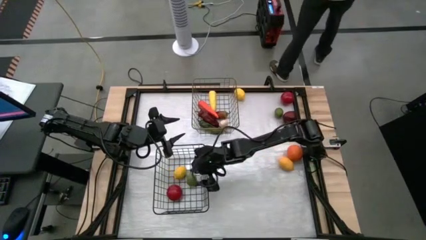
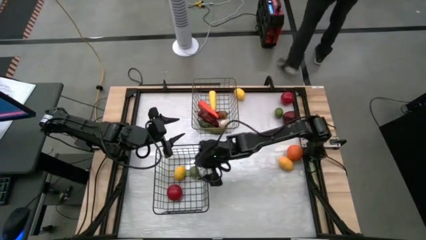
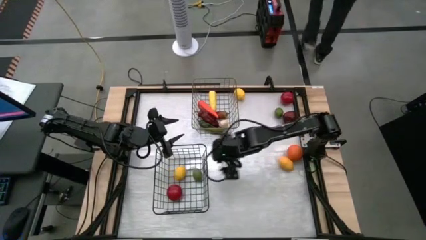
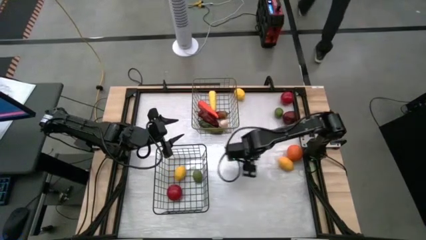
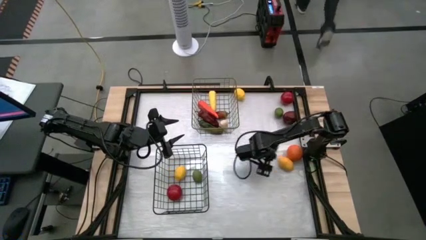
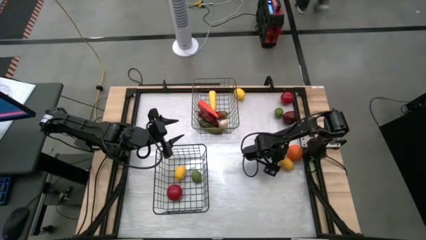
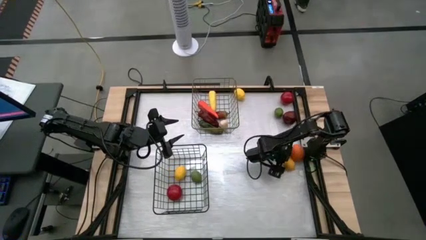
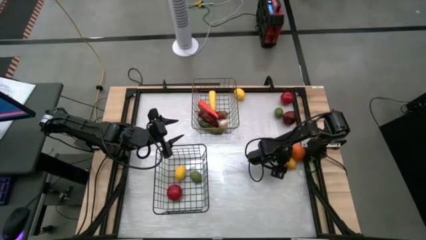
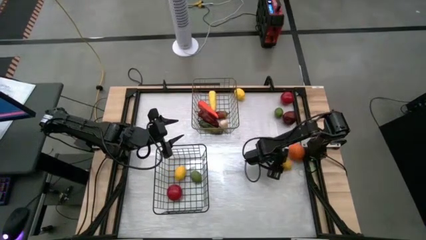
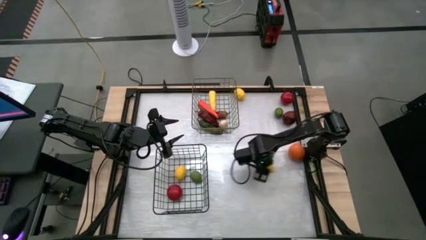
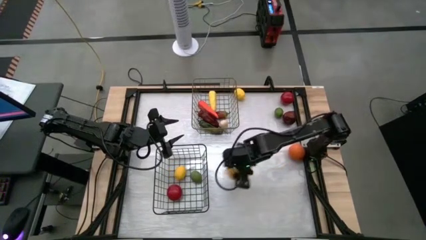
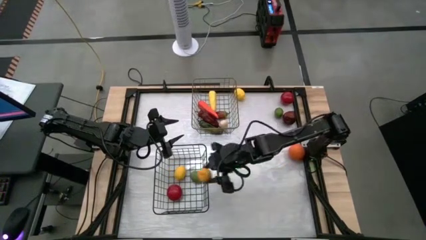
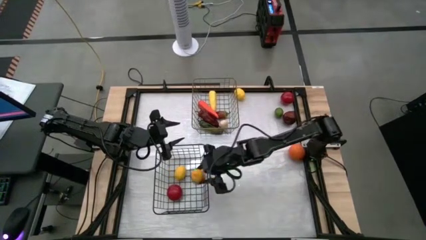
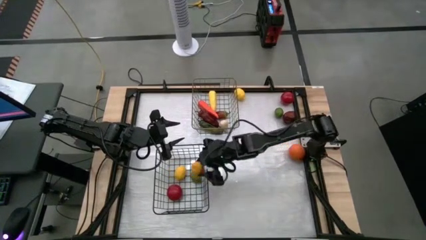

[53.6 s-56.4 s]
Task: Sort produce into baskets
Put the bottom lemon into the black wire basket

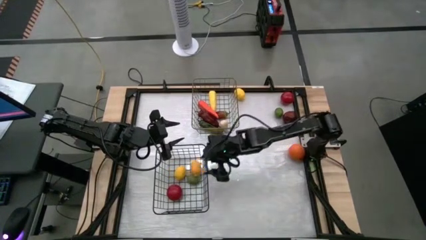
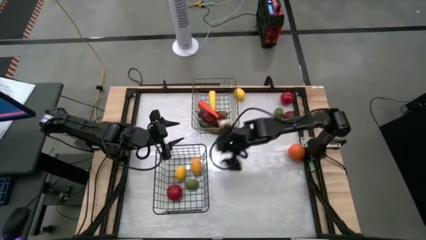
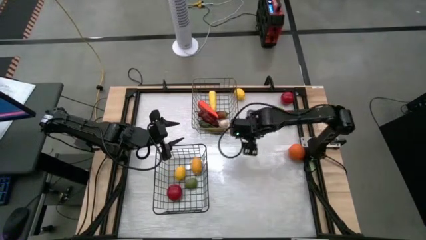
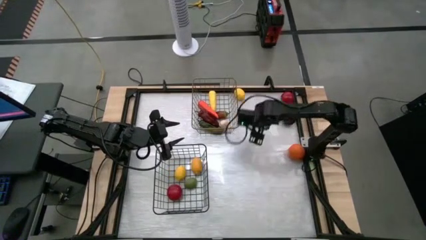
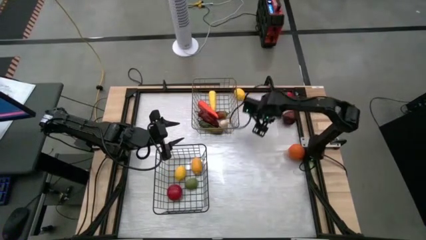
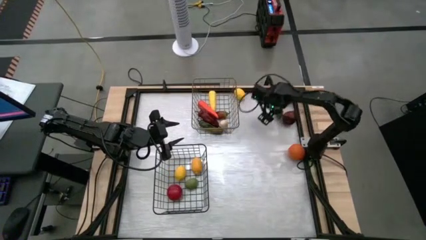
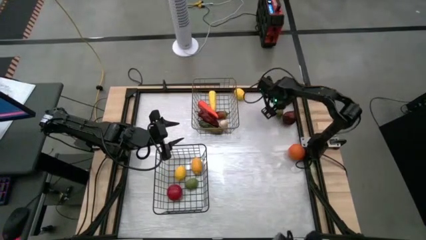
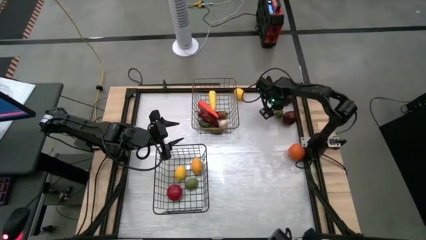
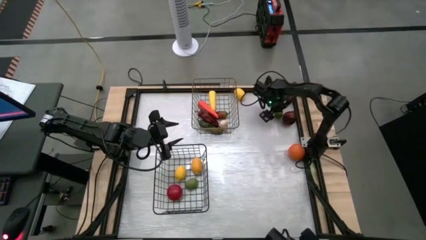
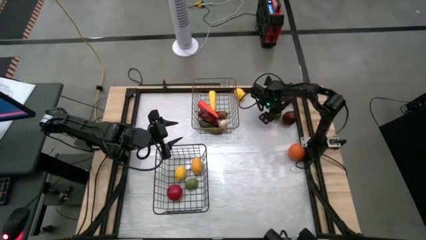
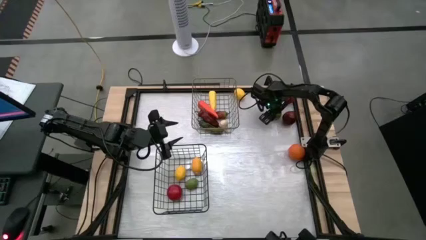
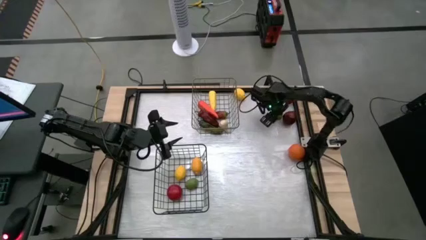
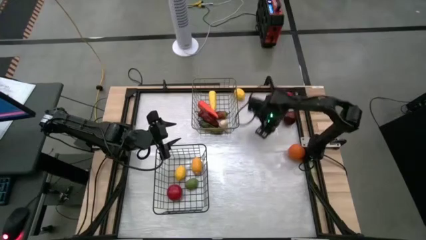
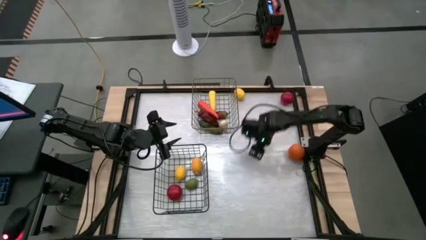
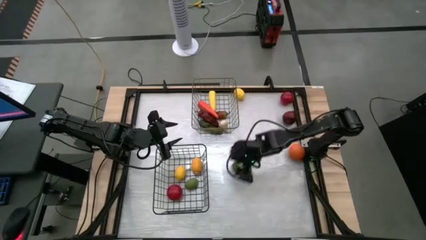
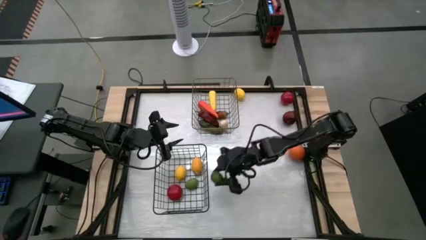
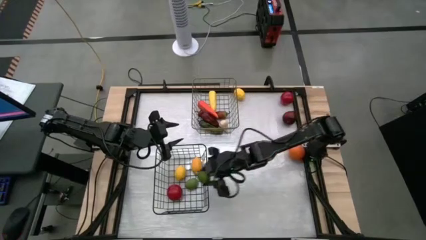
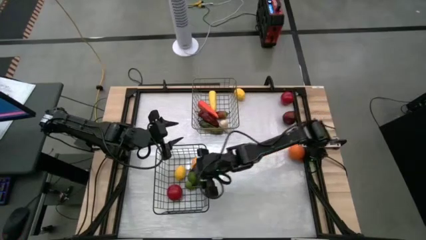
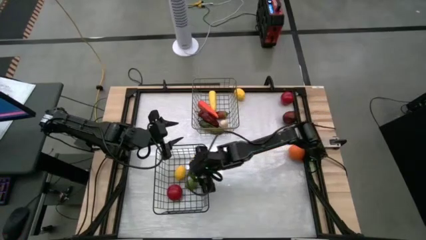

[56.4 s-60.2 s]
Put the lime into the black wire basket

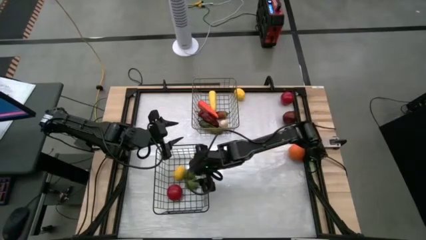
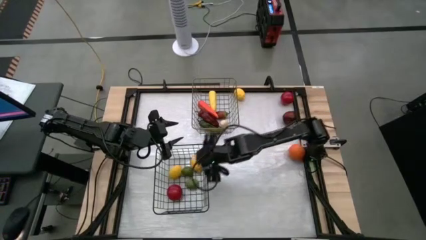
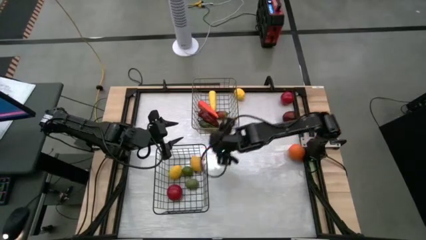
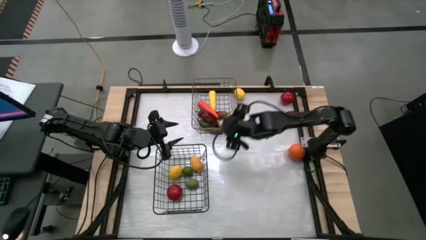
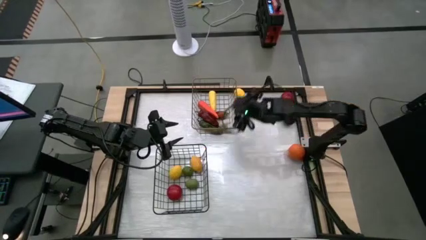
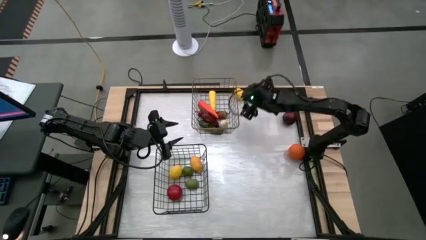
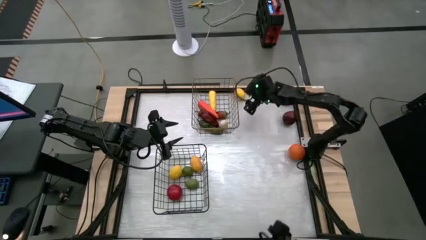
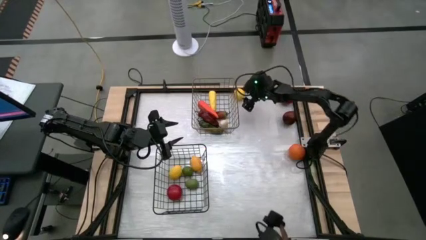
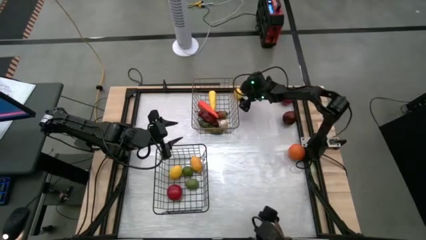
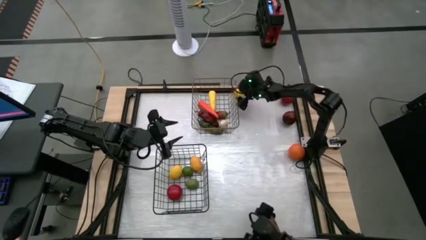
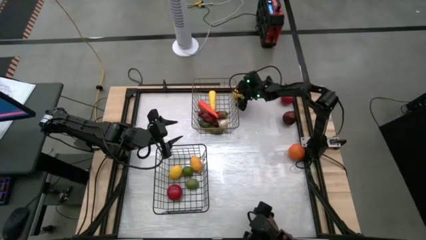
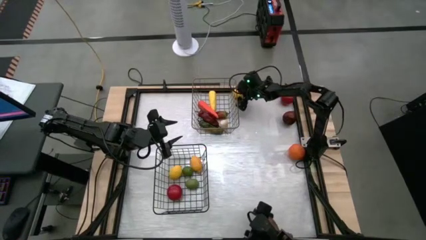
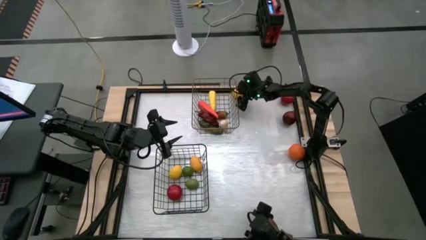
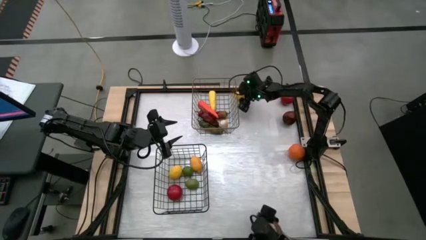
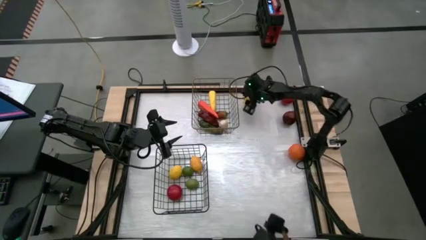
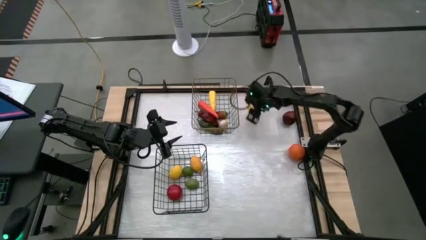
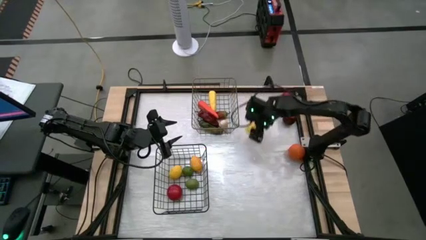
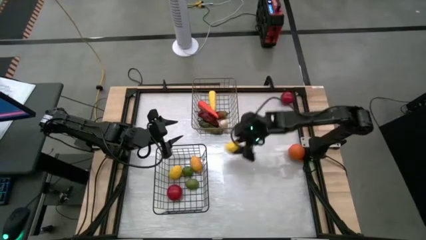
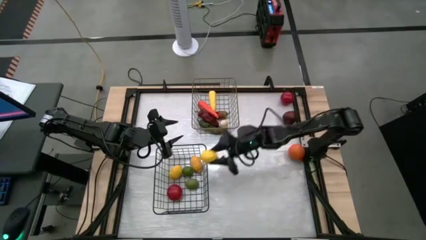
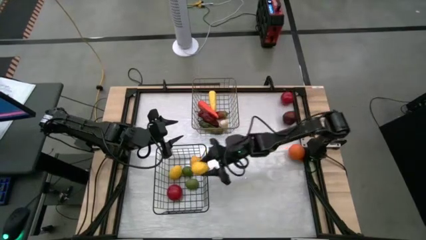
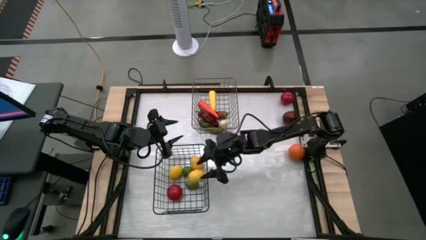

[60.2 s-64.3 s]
Put the lemon into the black wire basket

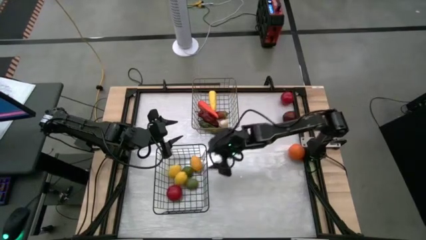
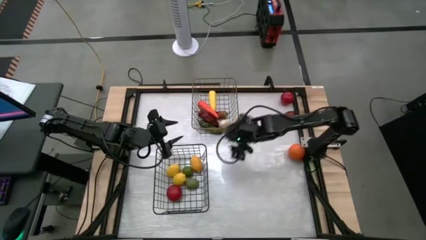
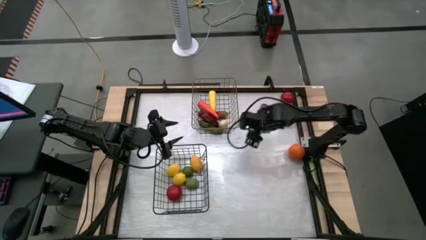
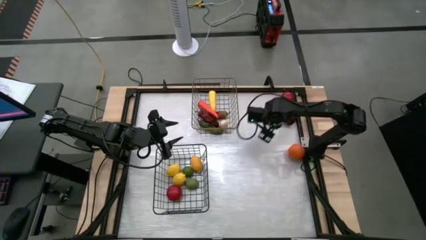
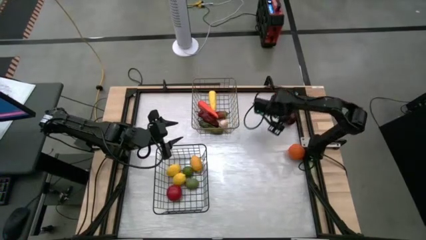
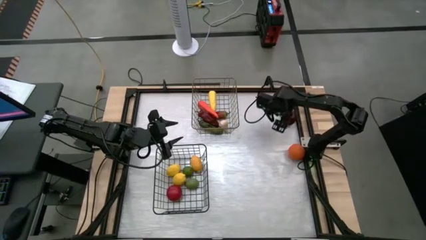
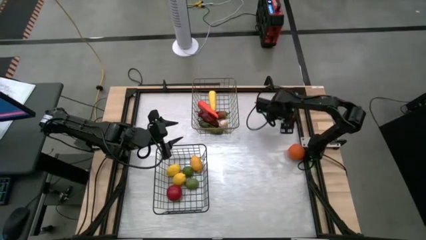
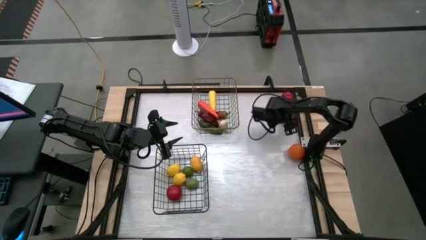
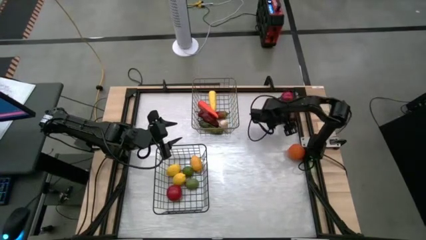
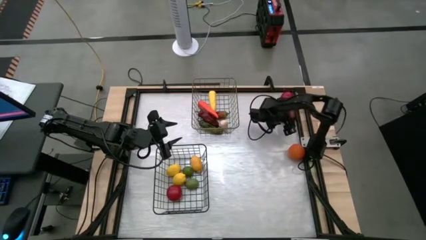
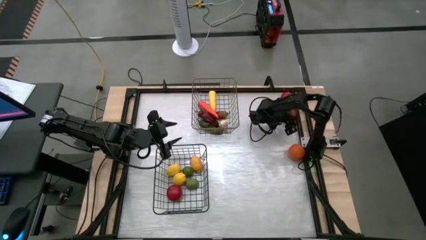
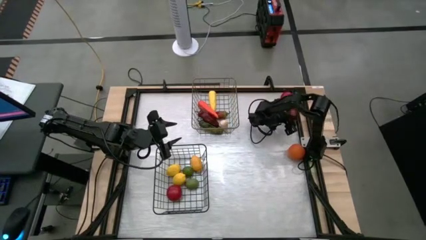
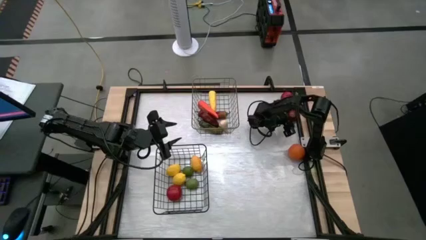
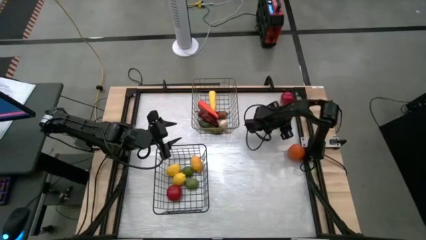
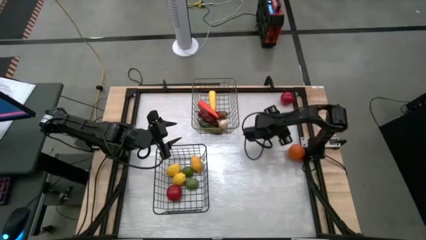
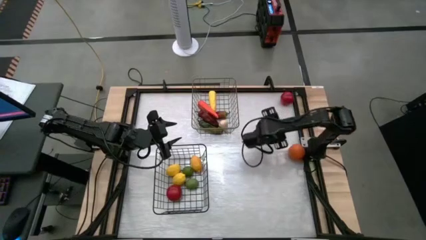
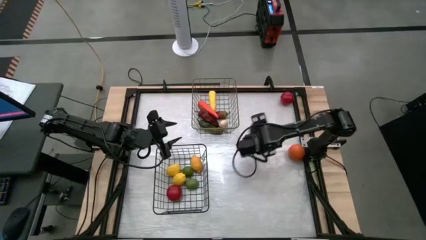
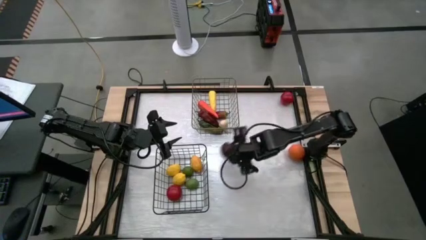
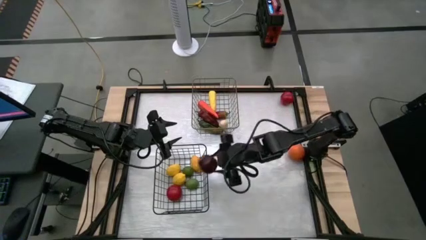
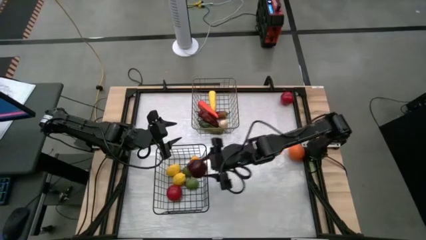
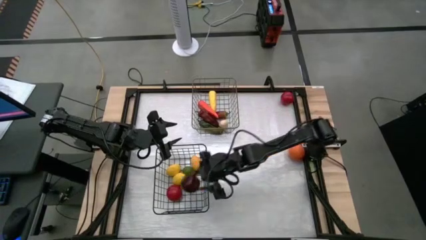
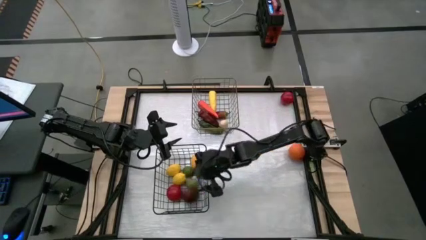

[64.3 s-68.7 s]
Put the apple into the black wire basket
